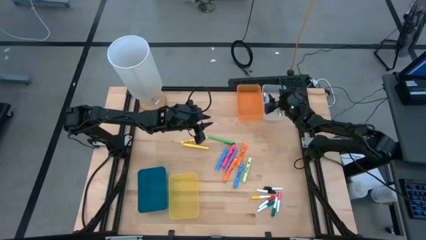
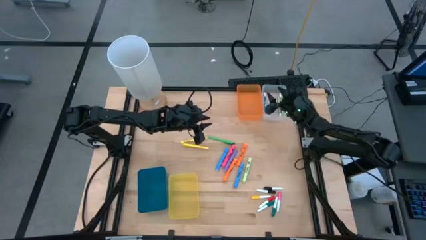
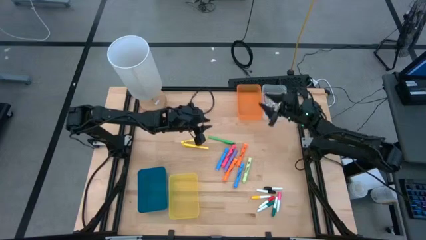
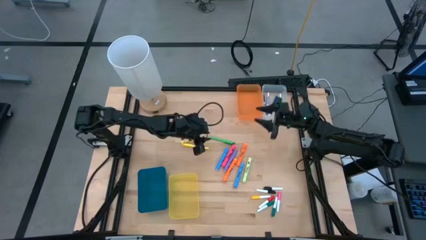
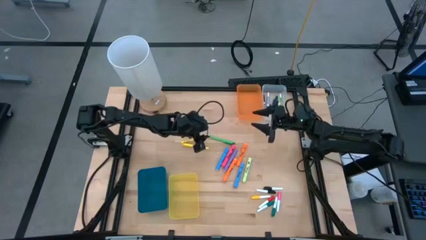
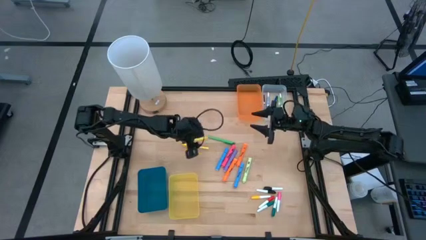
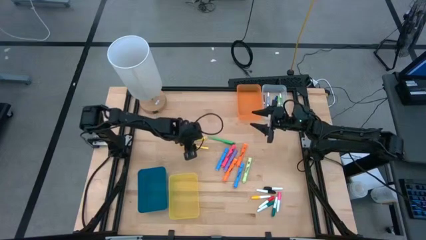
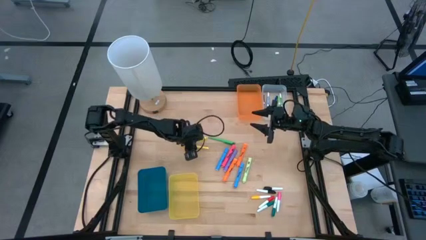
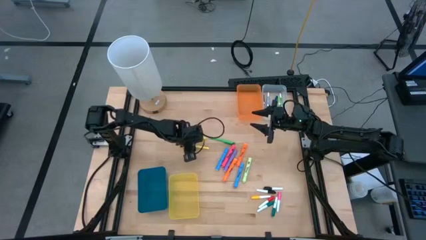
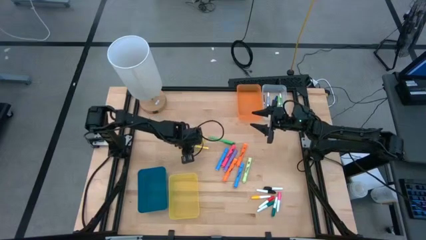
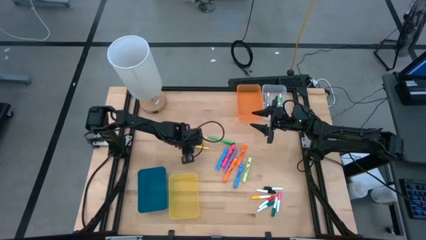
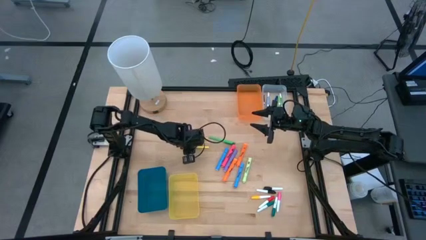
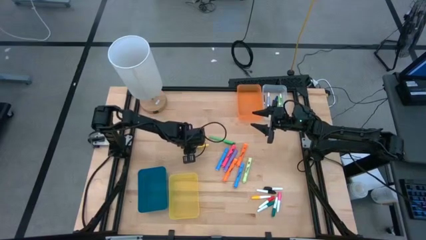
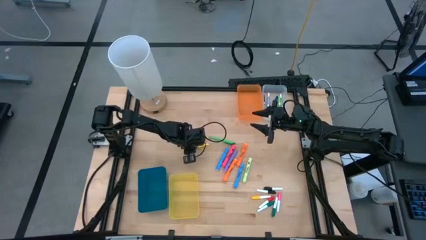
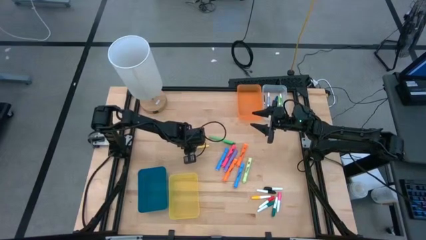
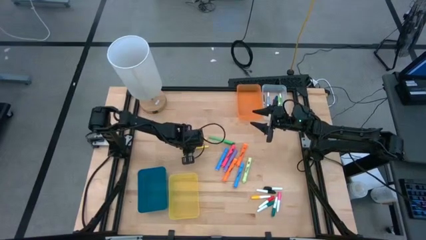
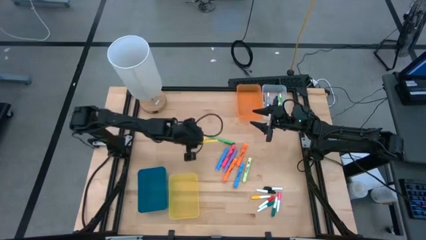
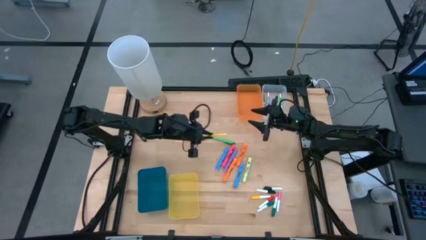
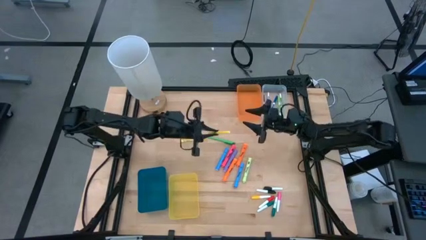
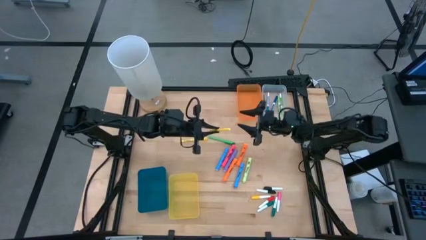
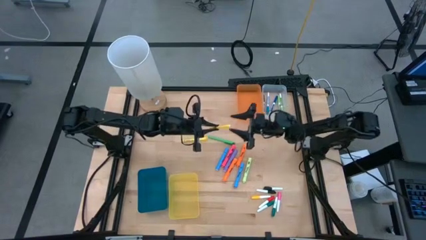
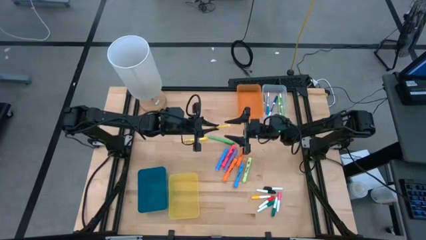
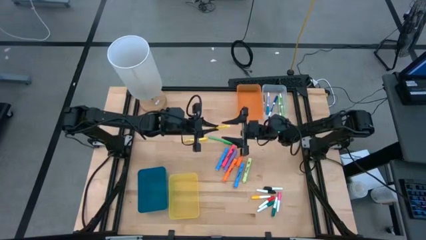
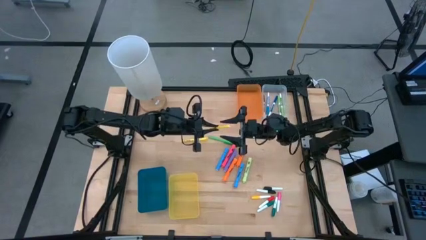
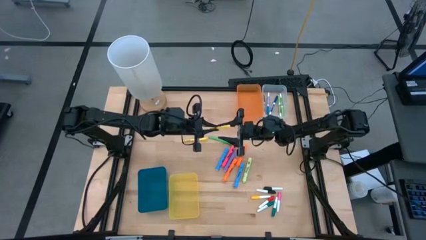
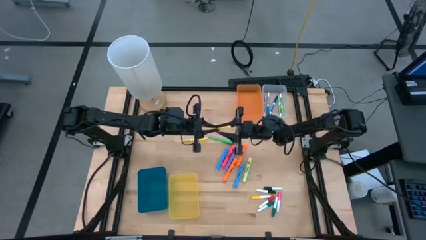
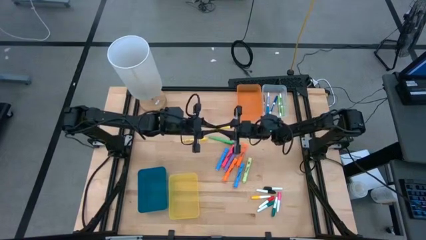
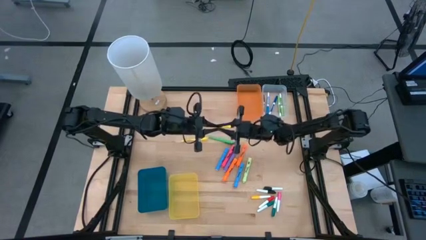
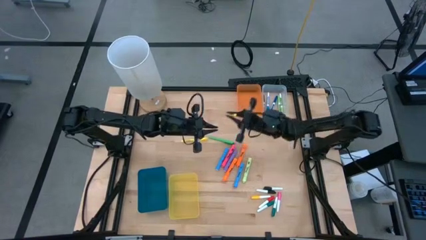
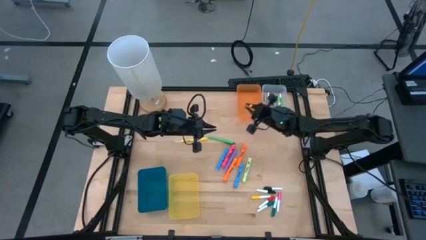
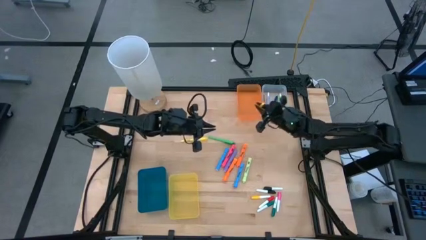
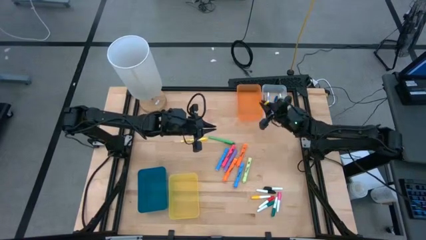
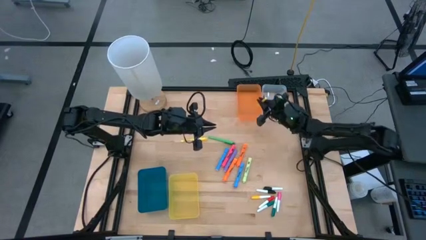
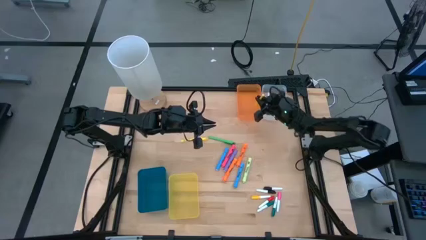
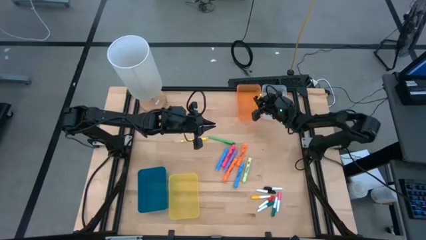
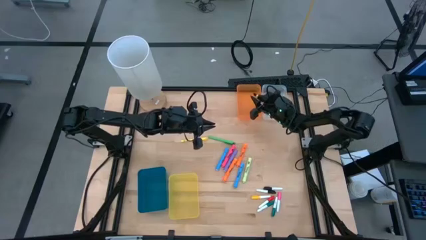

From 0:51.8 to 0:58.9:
Task: Pick & Place Markers
Put the bottom yellow pen into the orange bin

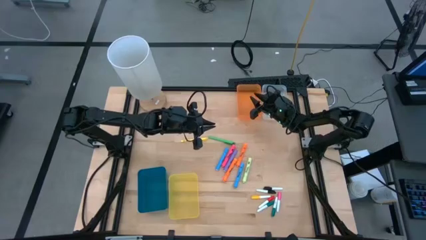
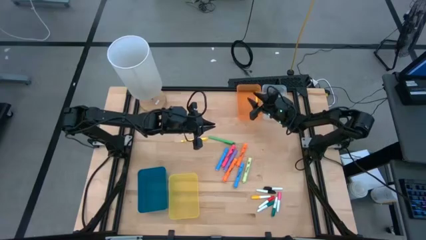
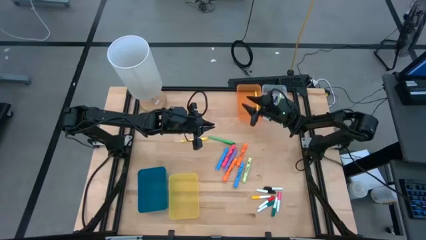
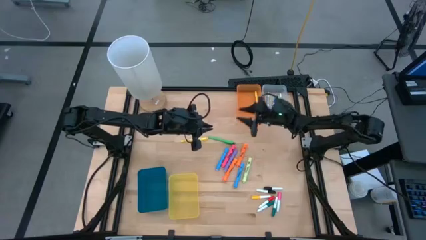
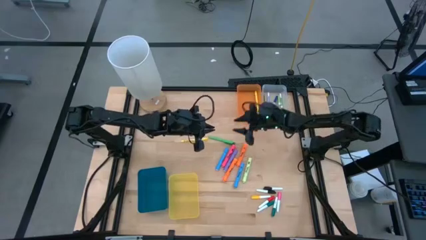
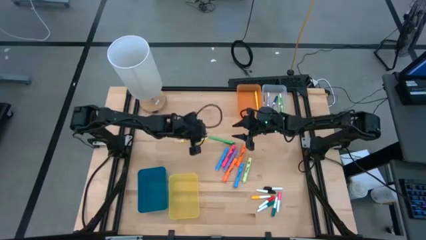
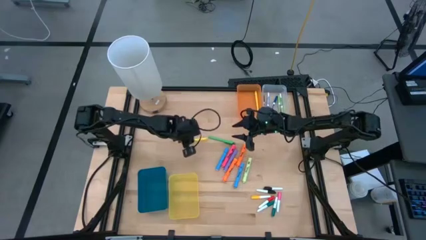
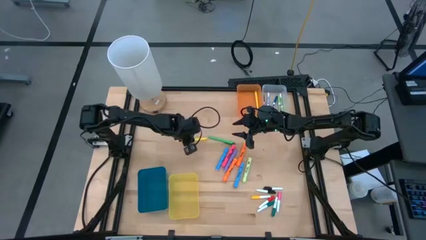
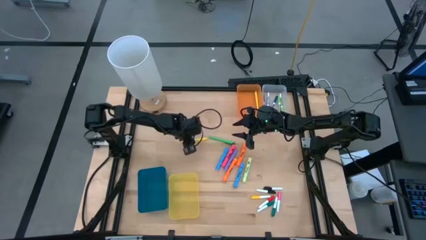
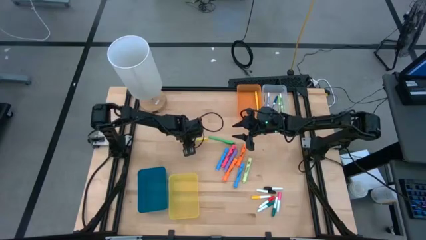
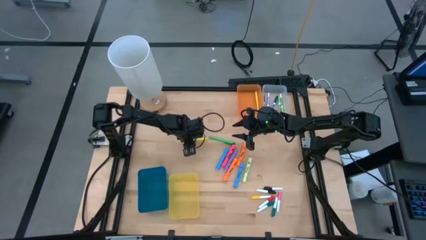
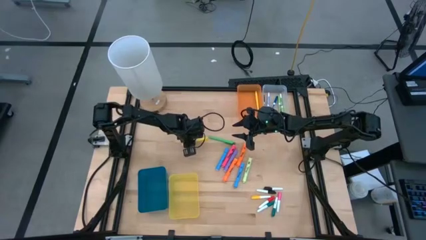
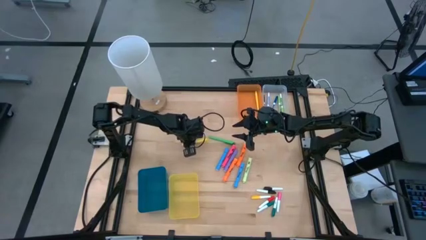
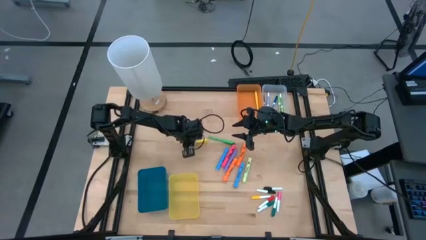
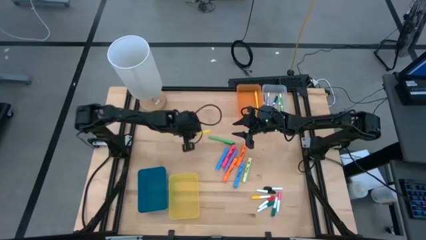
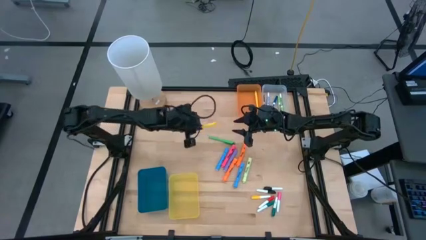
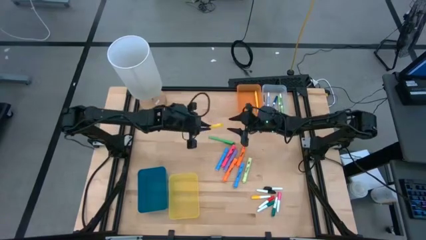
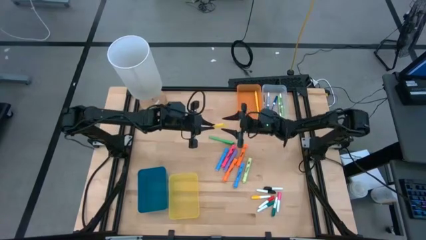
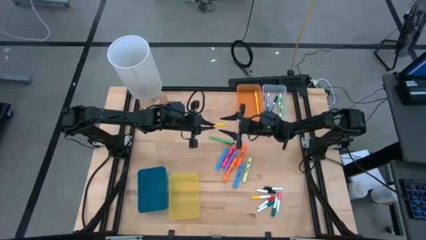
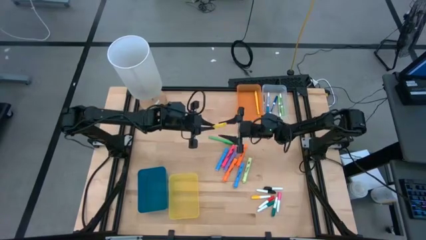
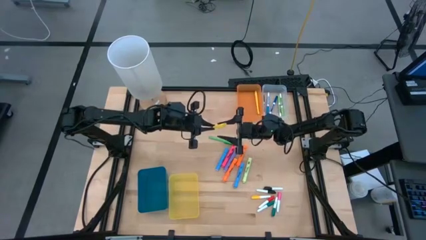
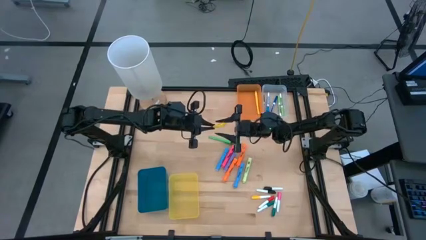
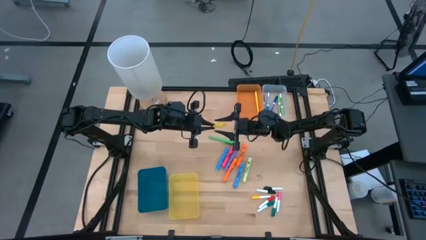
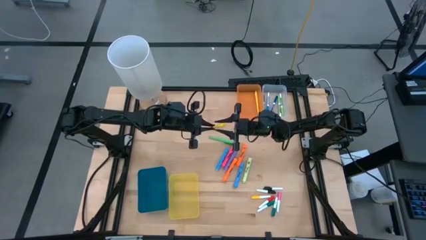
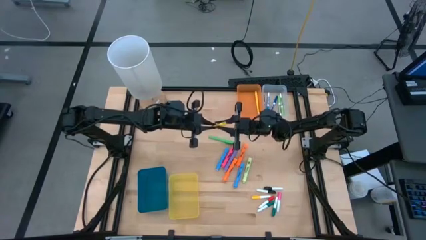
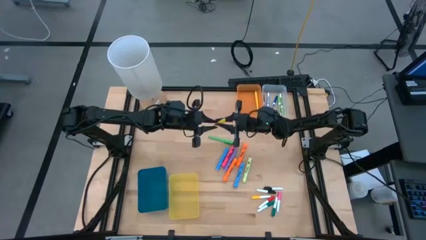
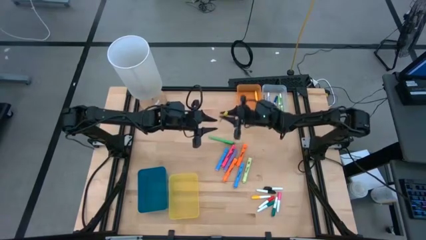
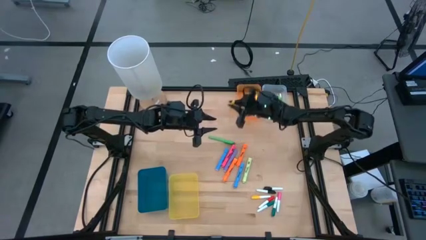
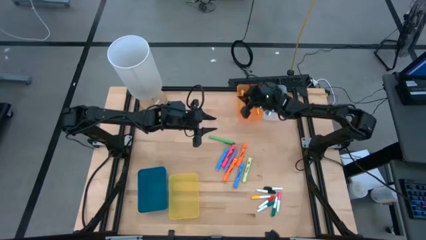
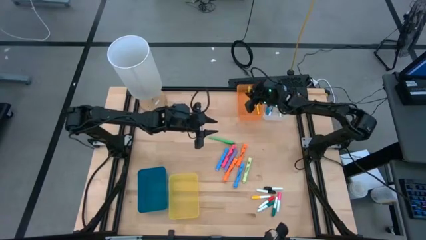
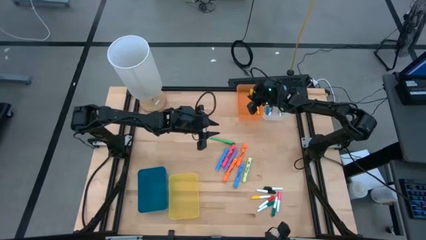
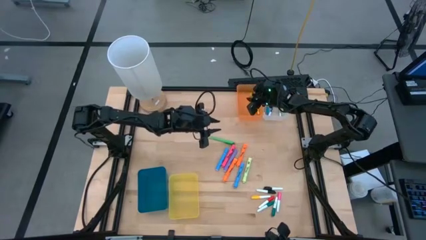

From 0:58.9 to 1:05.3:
Put the yellow pen into the orange bin

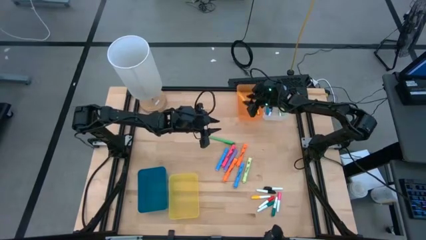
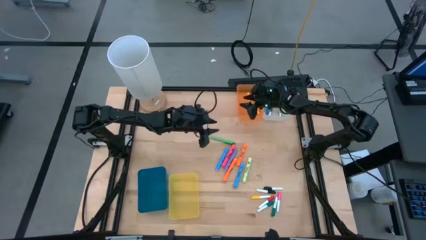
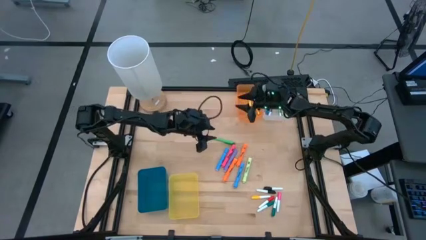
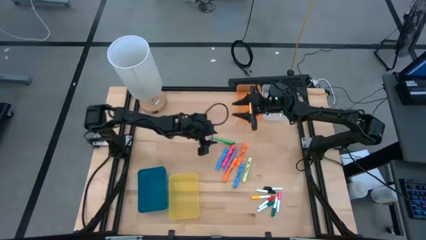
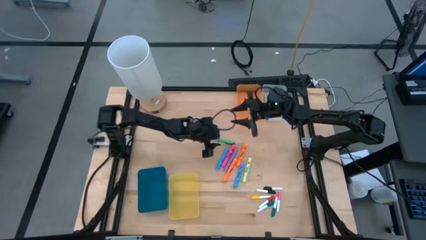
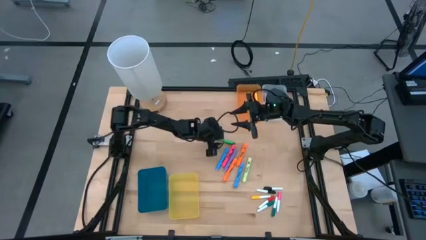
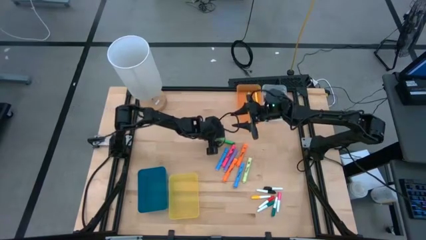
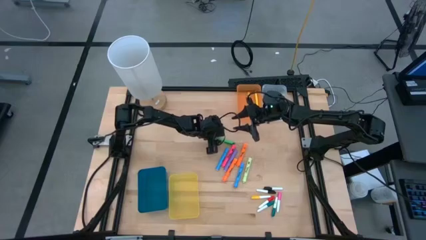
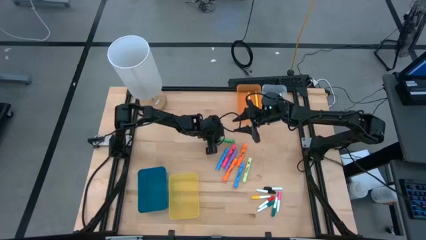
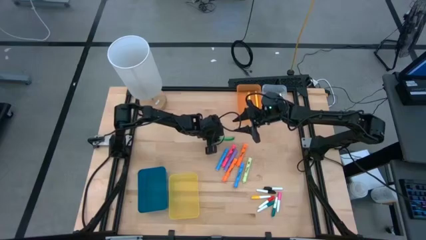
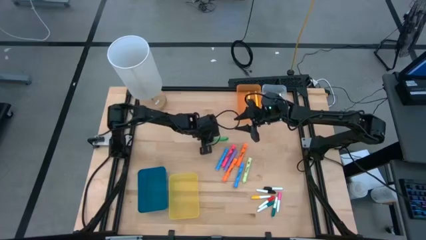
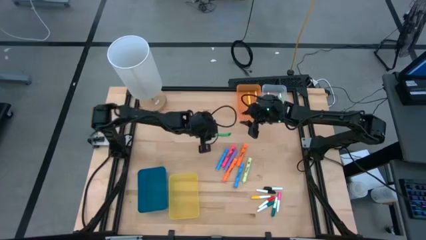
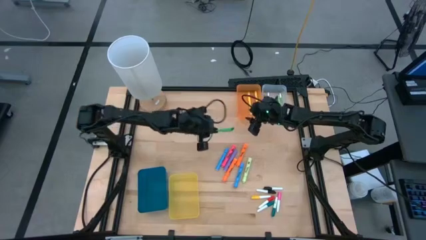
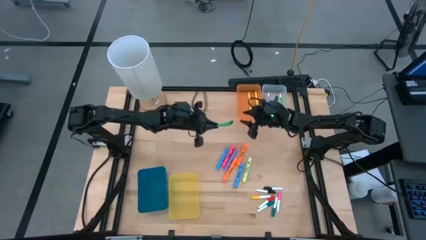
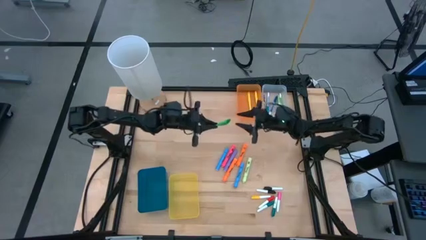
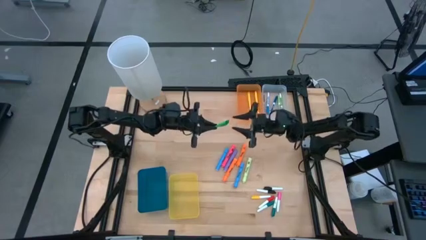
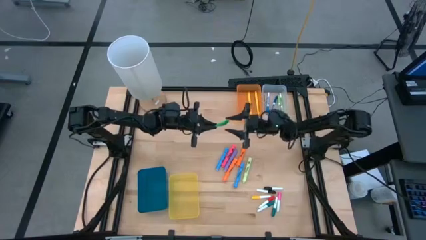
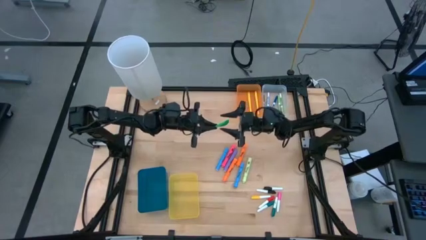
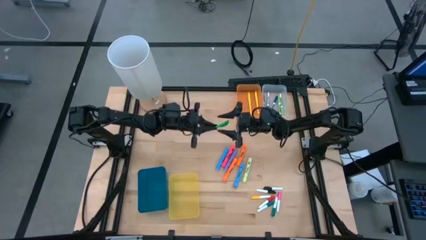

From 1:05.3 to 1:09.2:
Put the green pen into the orange bin
